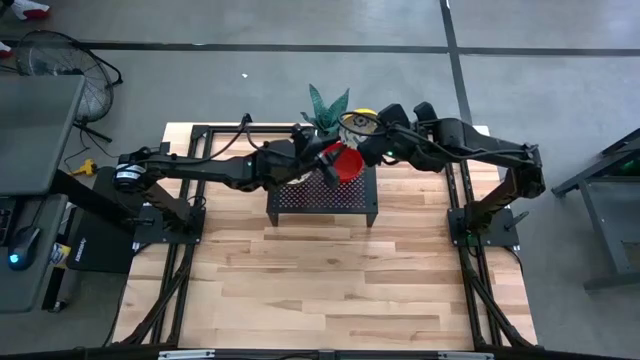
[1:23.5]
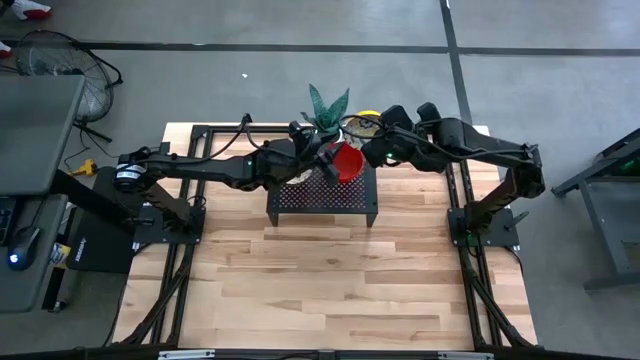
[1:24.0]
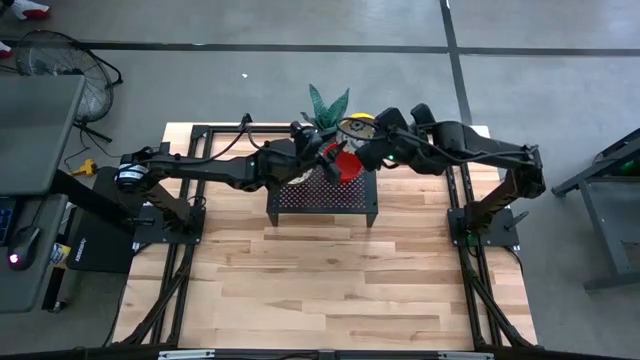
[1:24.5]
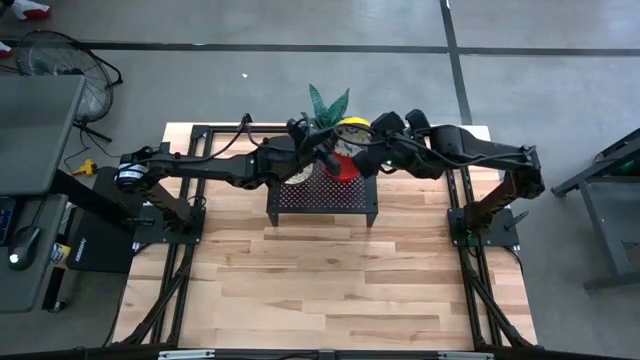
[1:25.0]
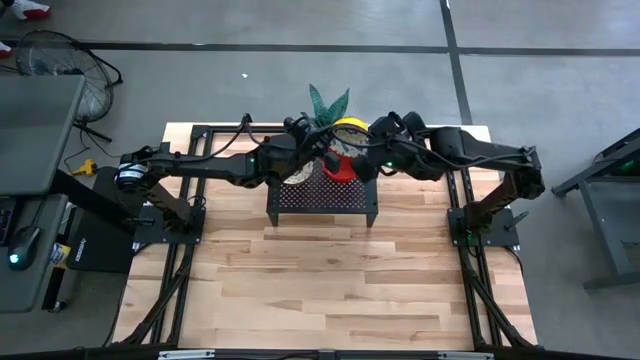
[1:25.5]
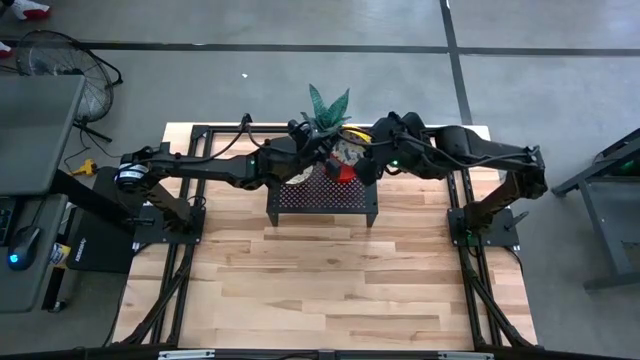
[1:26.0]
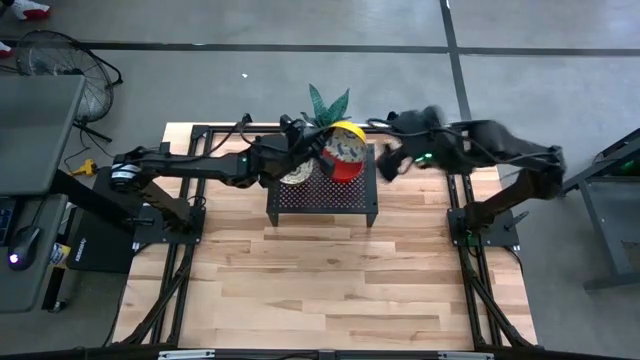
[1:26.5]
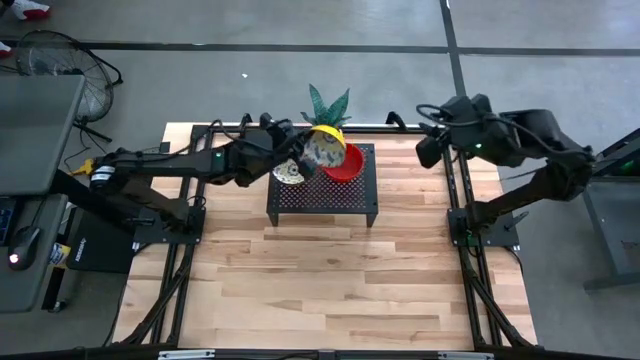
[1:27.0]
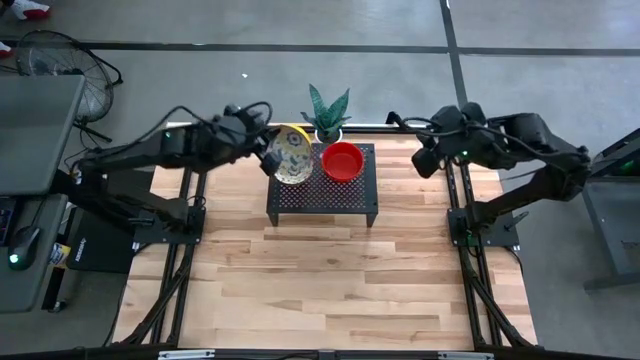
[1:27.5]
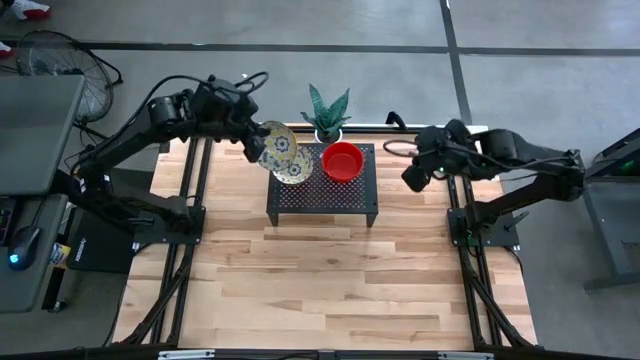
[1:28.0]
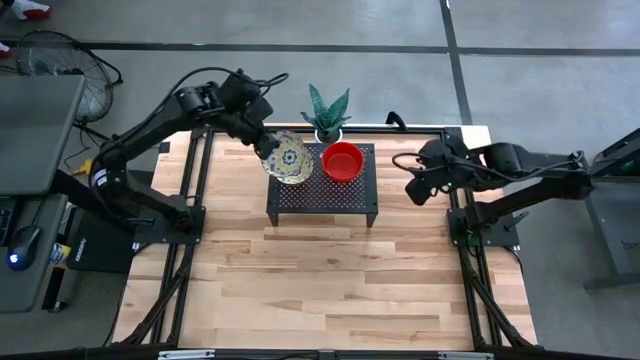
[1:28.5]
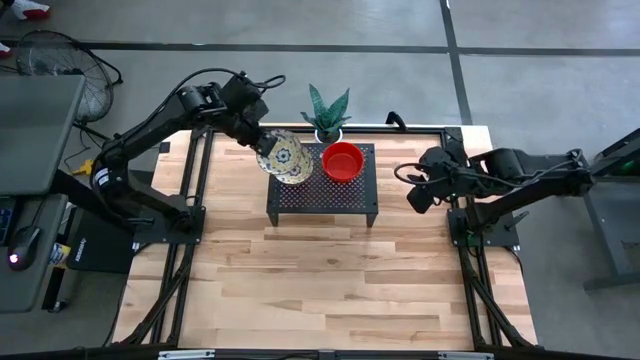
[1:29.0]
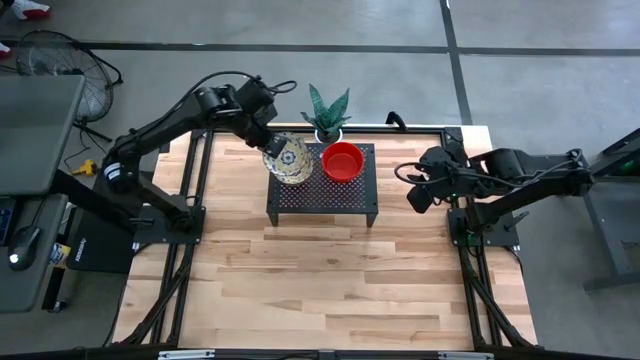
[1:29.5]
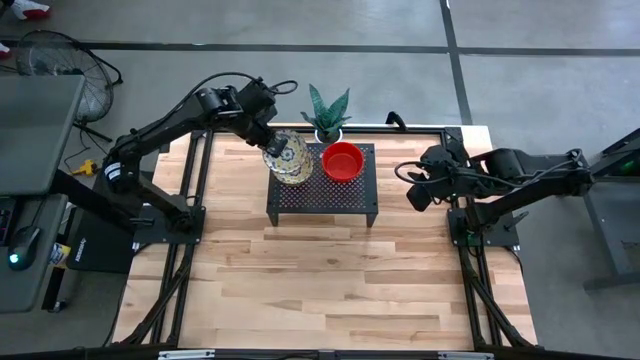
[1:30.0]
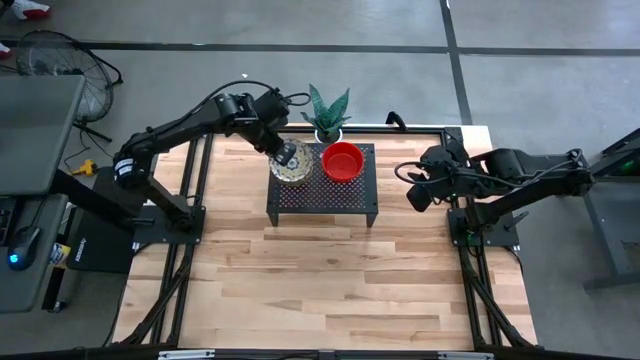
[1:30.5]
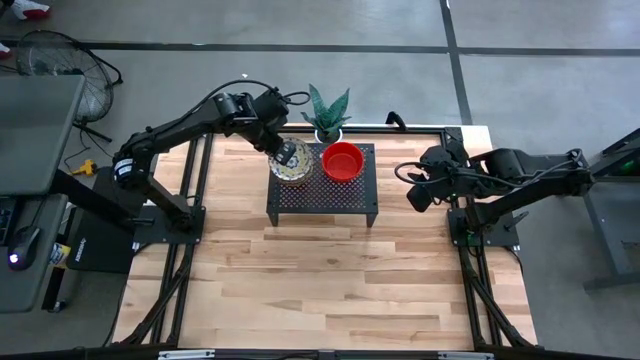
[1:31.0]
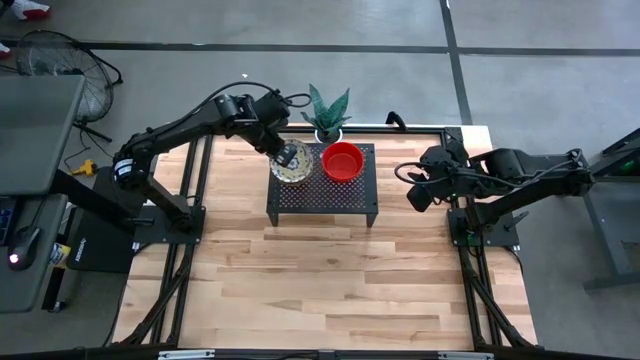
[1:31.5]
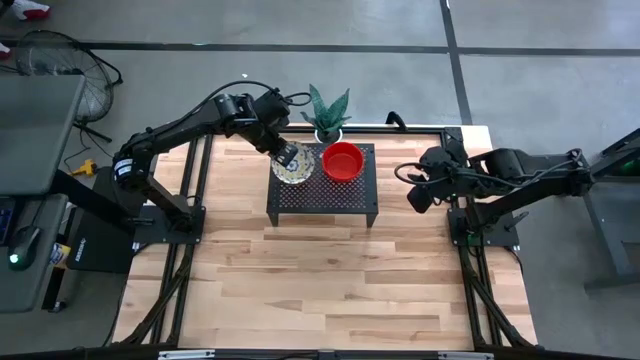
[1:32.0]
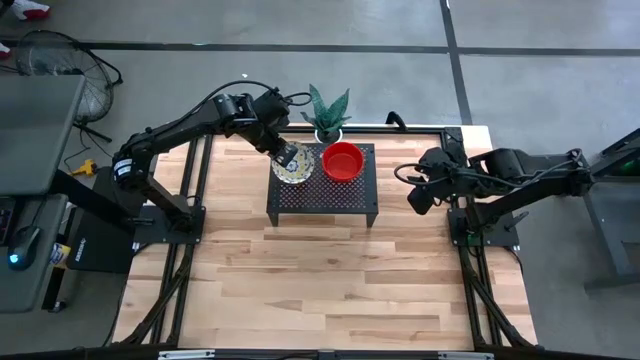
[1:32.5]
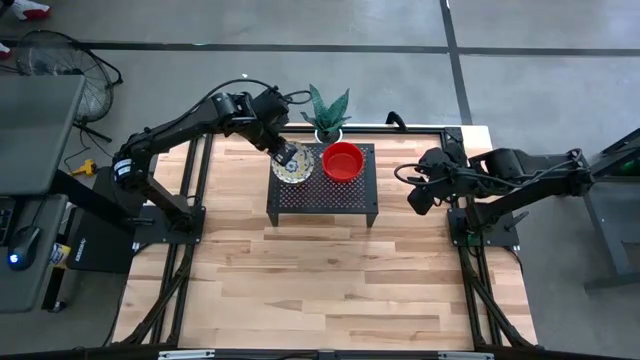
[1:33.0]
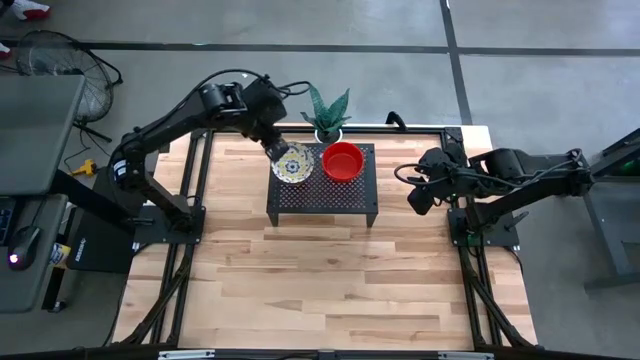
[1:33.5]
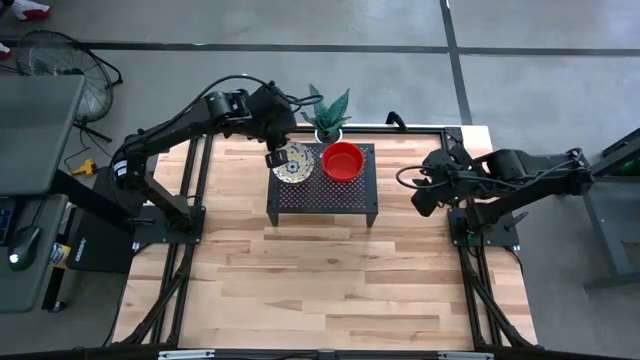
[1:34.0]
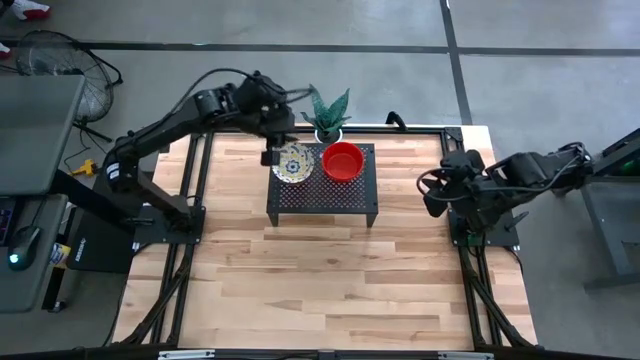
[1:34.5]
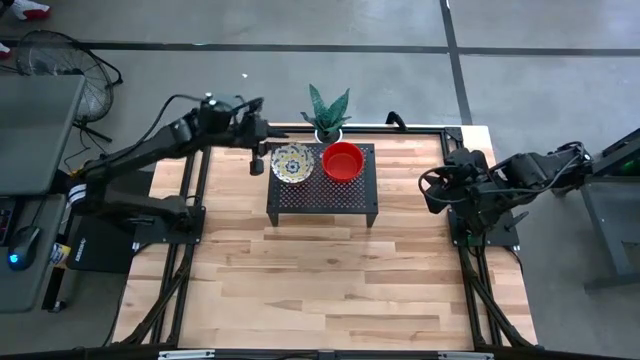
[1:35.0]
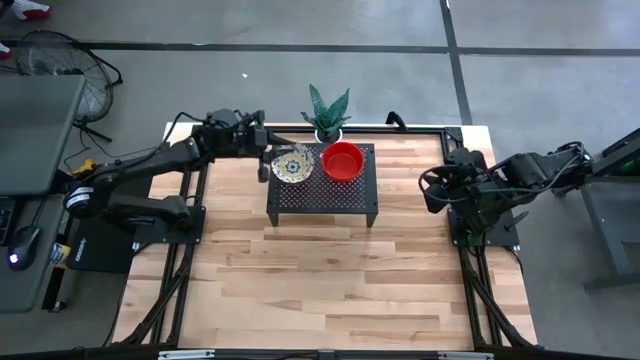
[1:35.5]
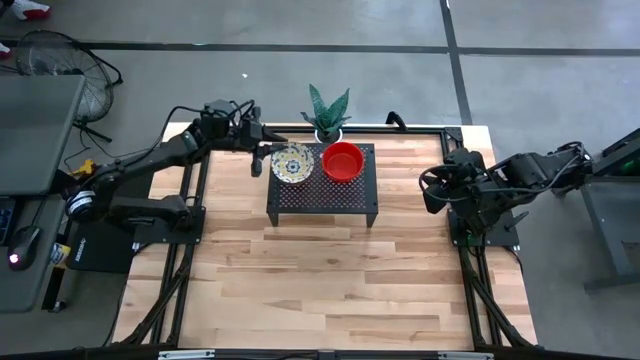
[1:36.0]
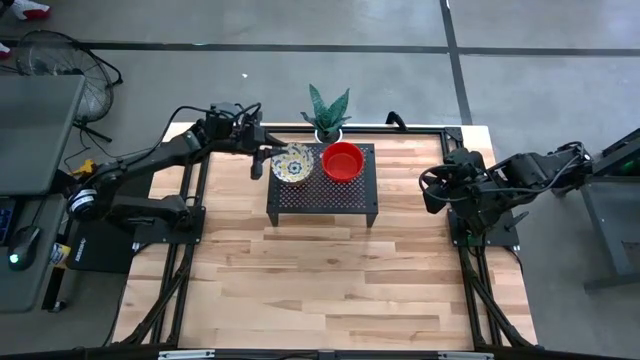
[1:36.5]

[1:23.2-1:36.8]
Task: Pick & Place Mini bowls
Stack the yellow bowl on the yellow bowls on the shelf

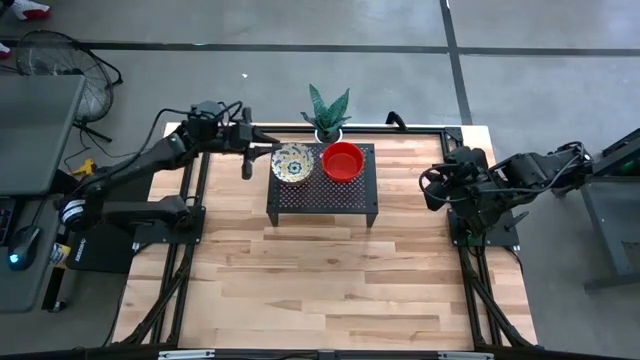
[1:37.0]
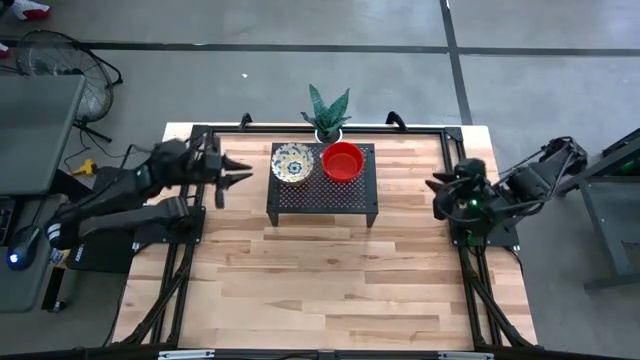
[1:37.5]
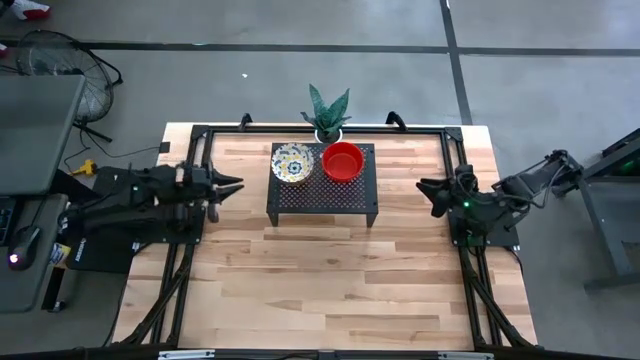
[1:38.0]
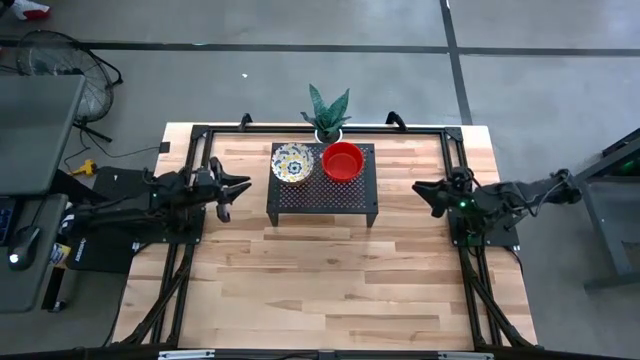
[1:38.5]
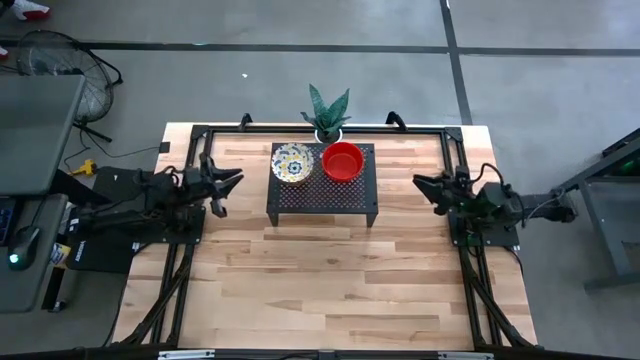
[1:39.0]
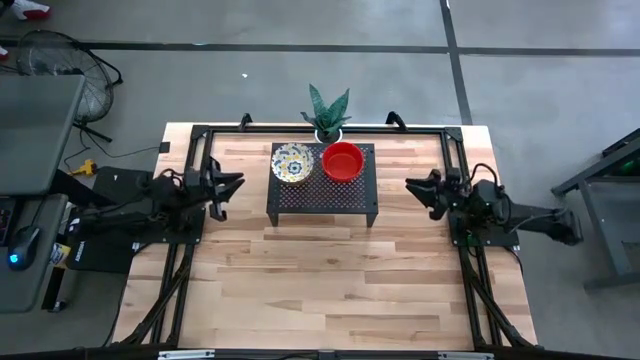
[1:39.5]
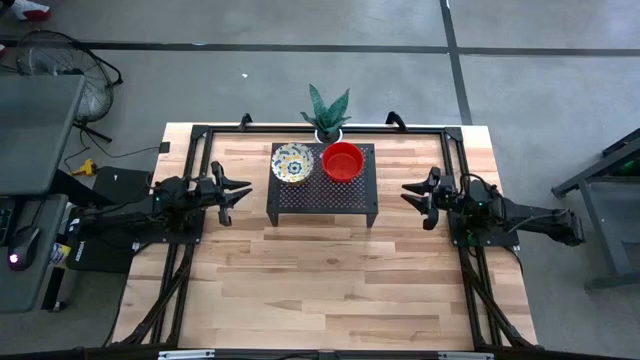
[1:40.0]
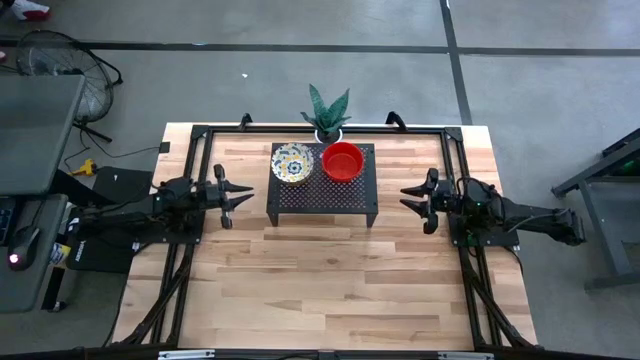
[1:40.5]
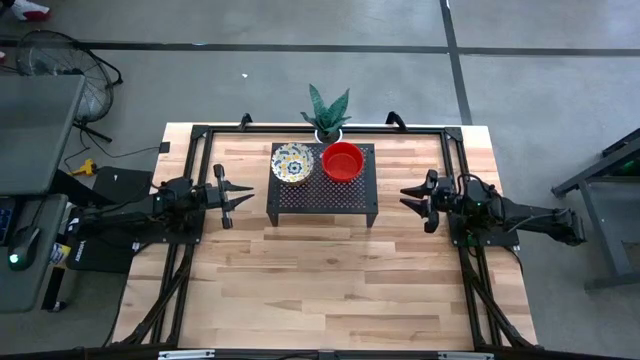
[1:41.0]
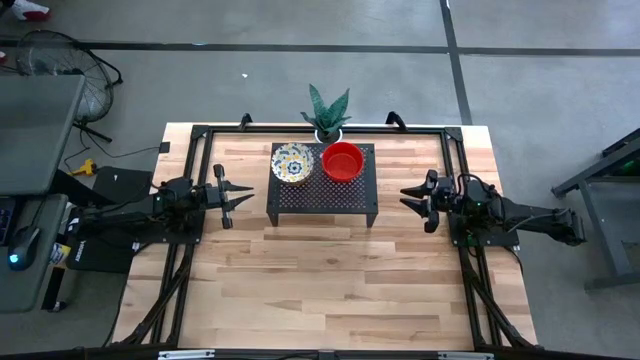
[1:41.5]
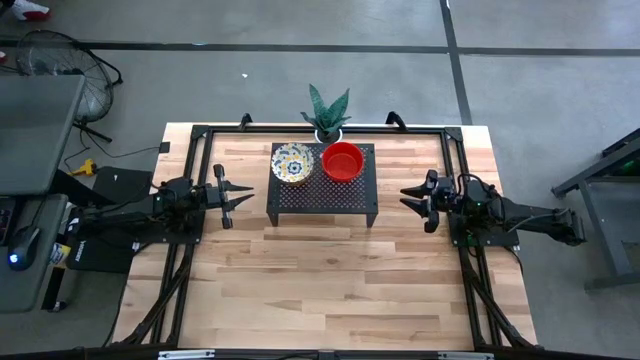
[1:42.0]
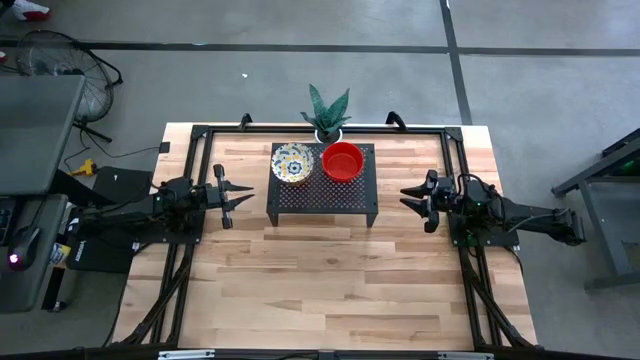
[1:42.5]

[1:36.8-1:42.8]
Return to Home Position

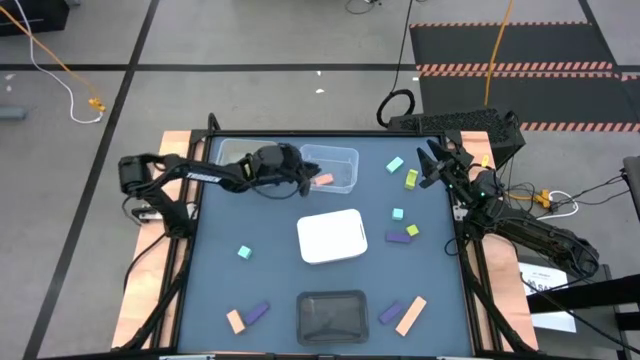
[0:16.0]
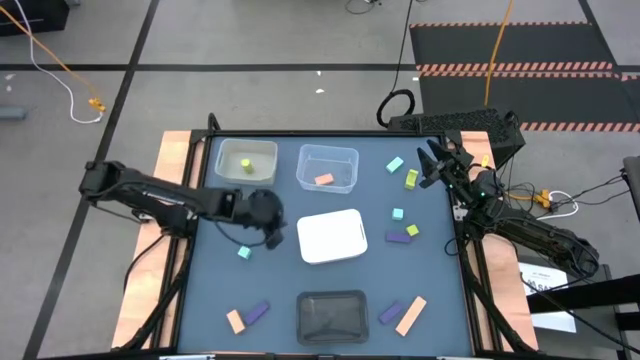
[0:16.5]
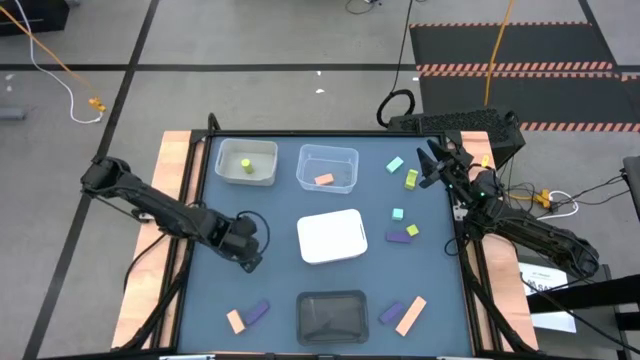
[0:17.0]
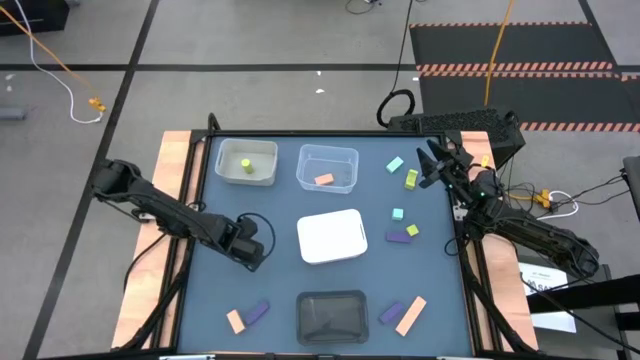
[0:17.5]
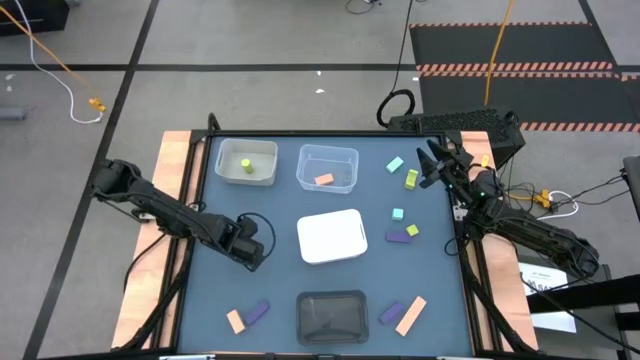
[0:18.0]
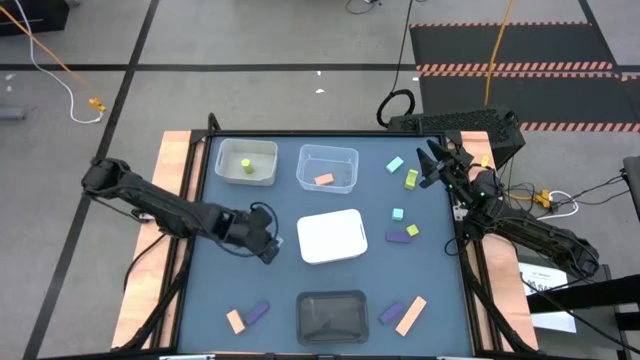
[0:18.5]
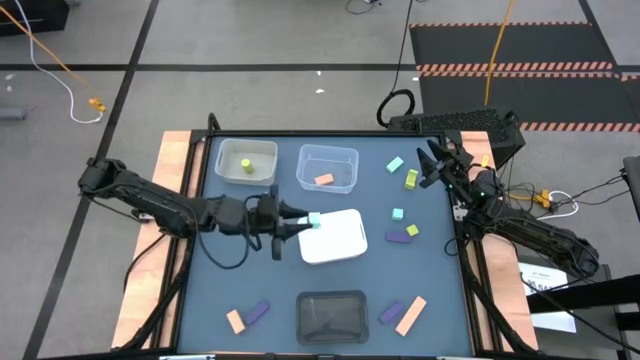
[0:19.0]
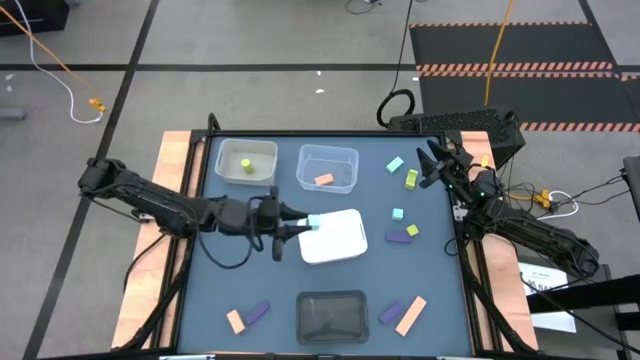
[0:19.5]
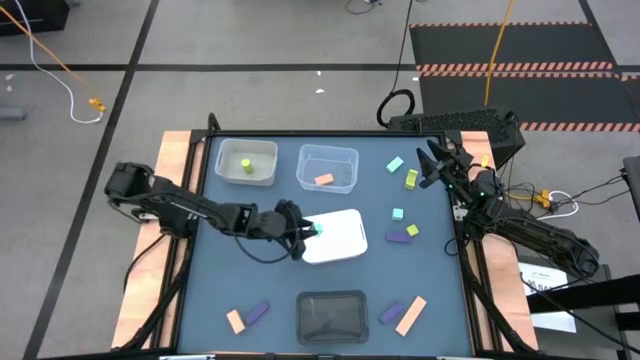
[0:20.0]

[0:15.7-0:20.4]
Task: Sort & place blocks by color
Put the bottom left light blue block into the white bin
